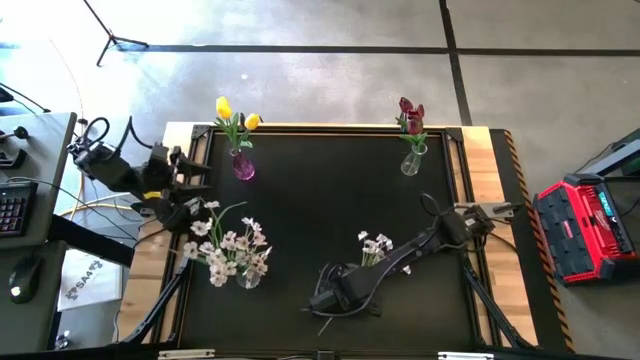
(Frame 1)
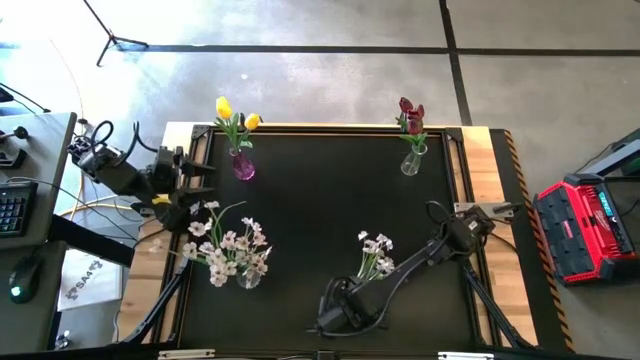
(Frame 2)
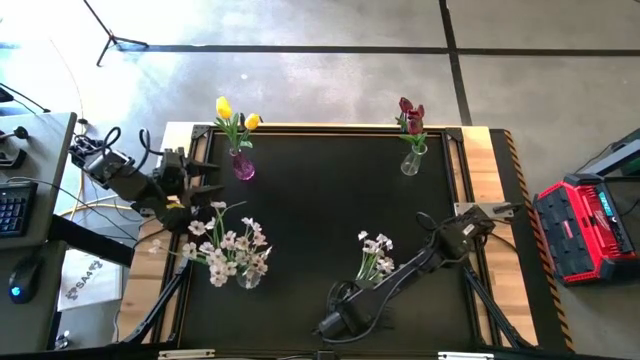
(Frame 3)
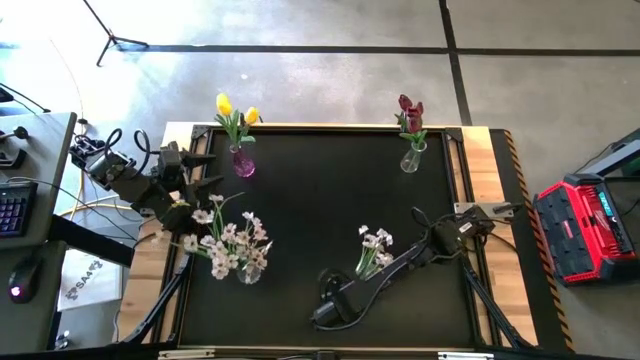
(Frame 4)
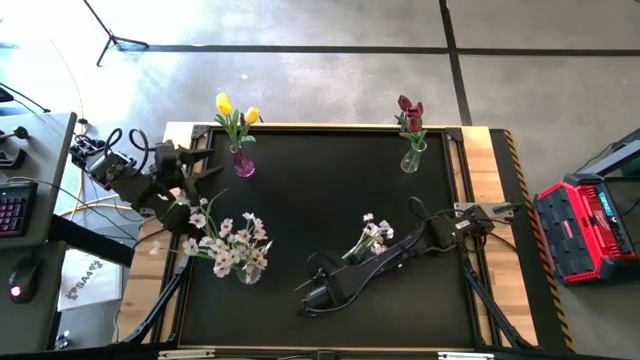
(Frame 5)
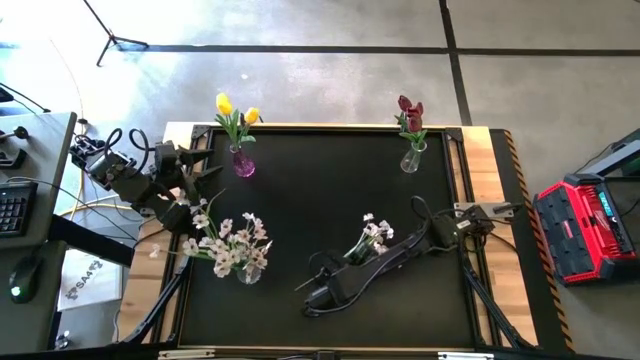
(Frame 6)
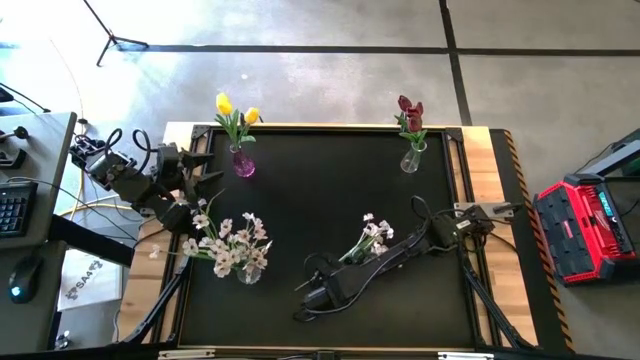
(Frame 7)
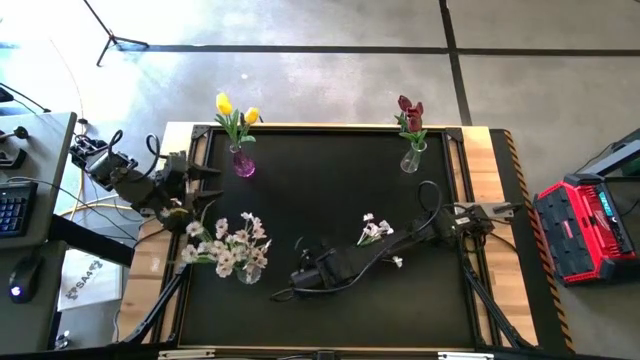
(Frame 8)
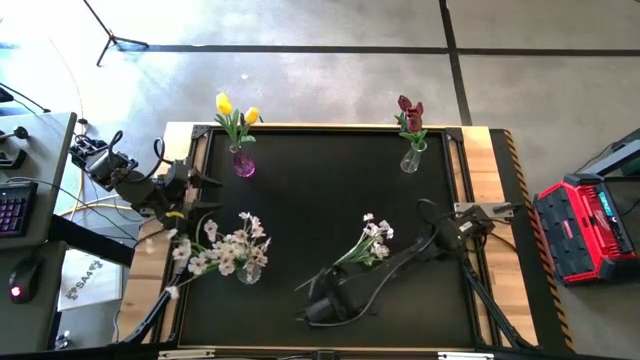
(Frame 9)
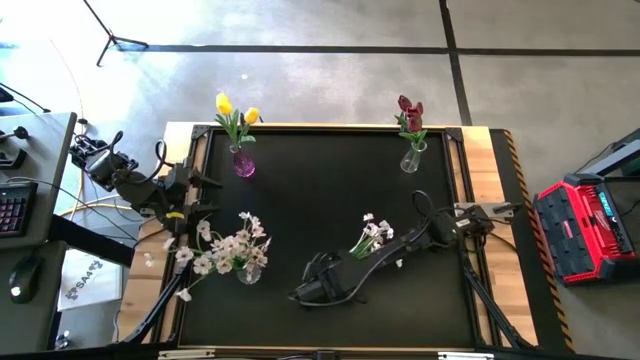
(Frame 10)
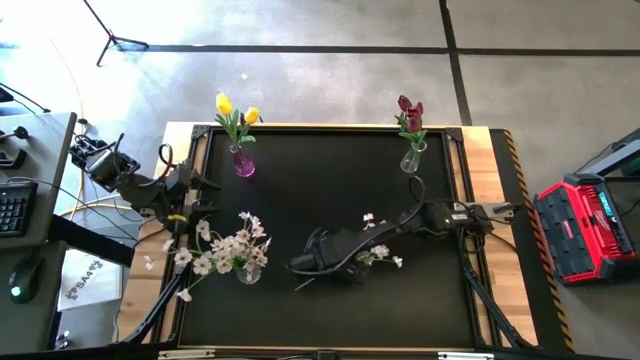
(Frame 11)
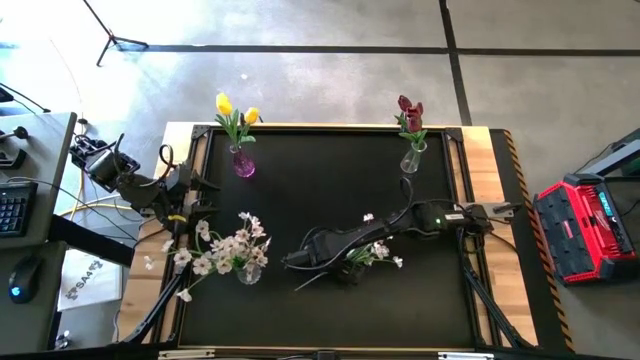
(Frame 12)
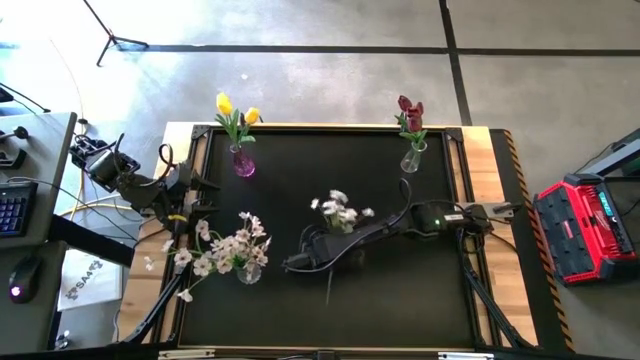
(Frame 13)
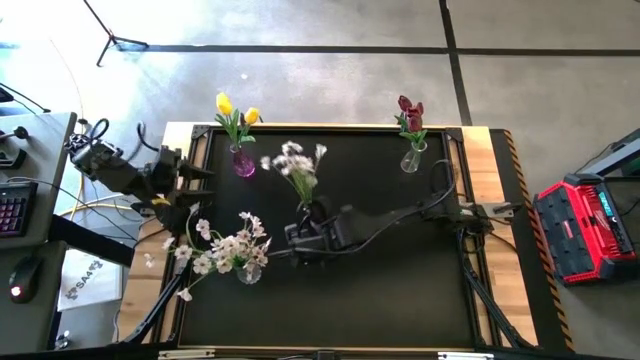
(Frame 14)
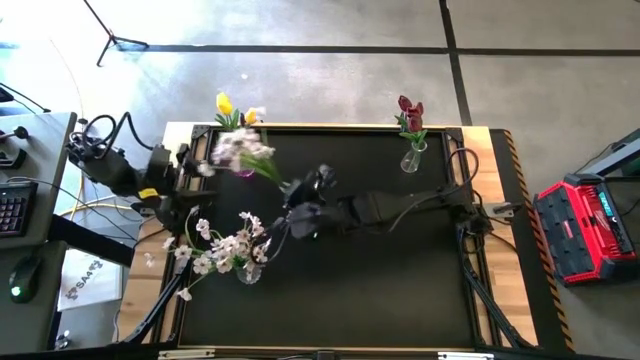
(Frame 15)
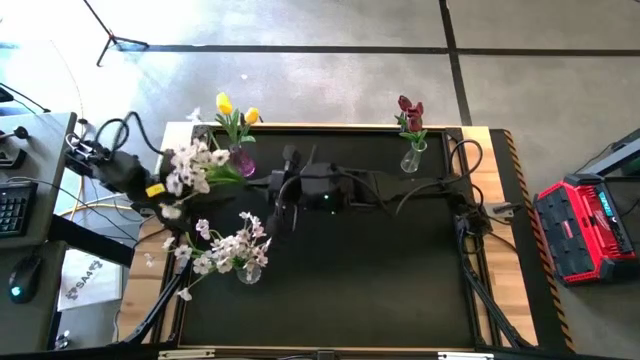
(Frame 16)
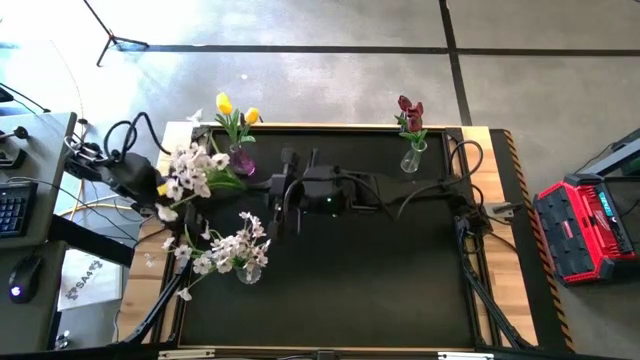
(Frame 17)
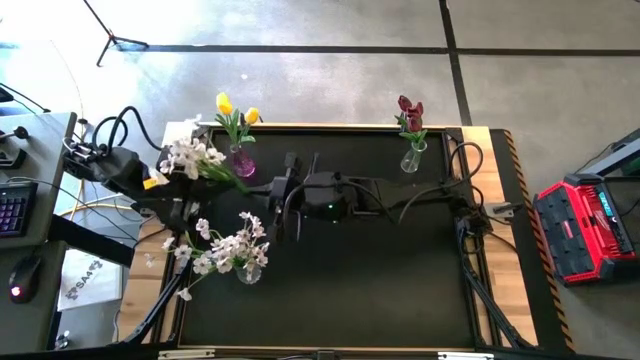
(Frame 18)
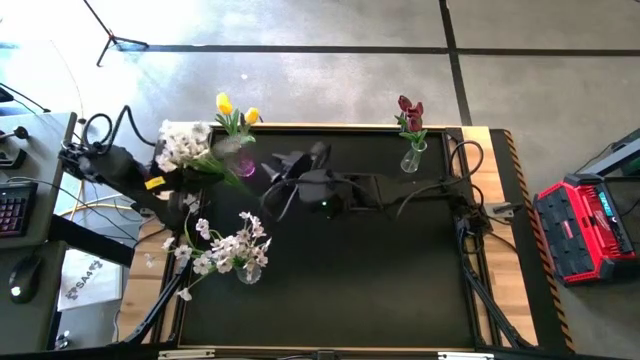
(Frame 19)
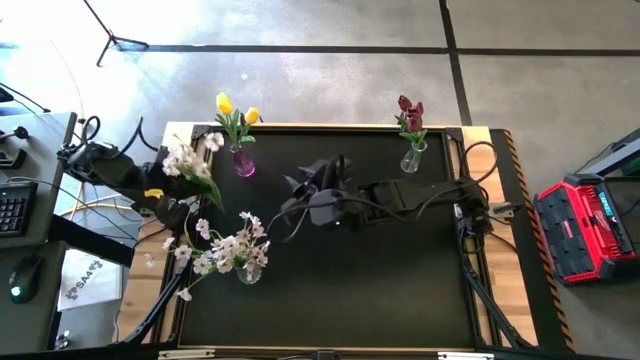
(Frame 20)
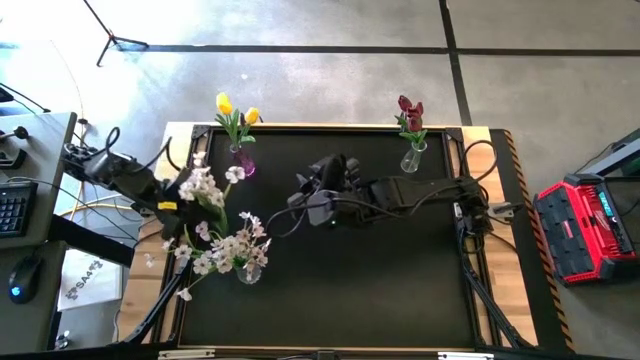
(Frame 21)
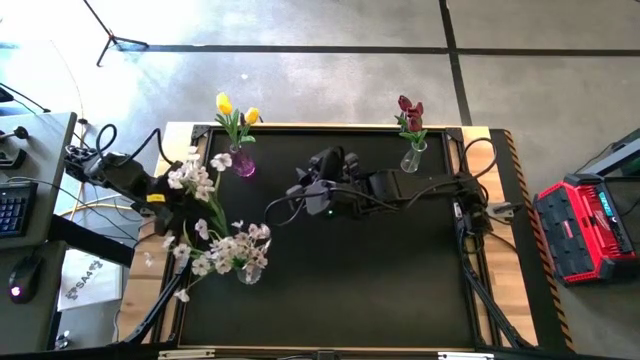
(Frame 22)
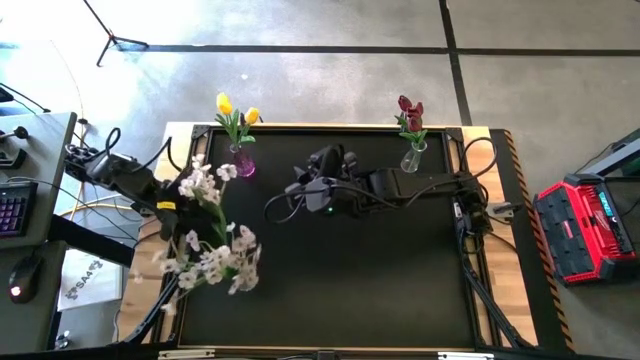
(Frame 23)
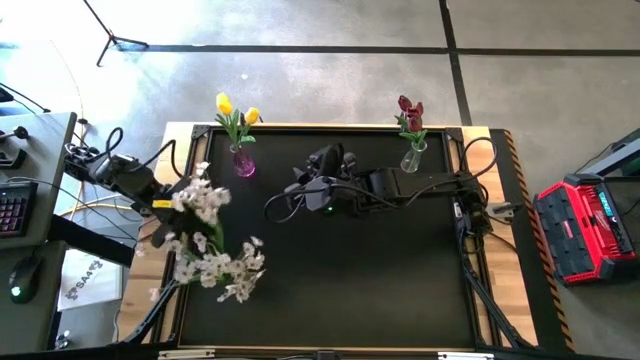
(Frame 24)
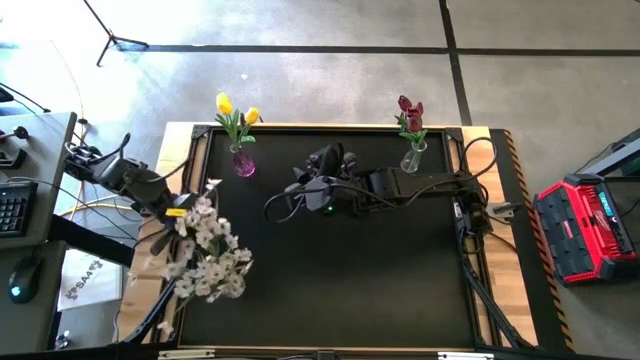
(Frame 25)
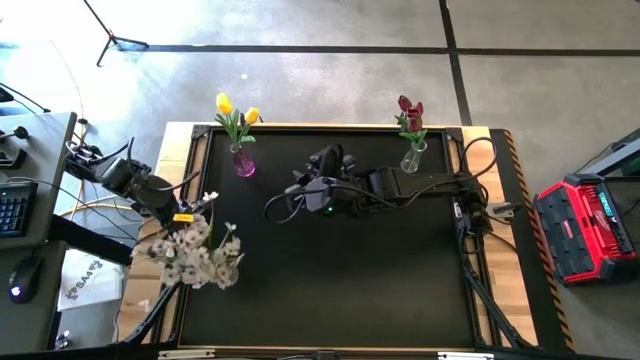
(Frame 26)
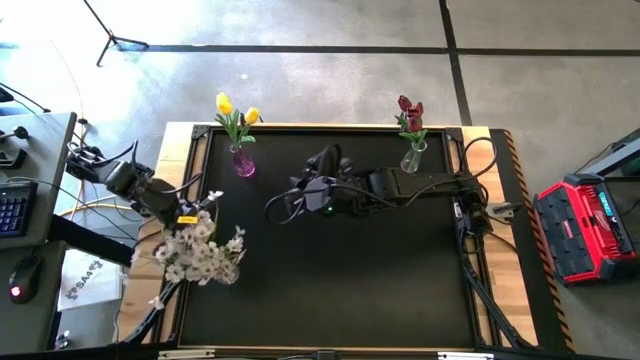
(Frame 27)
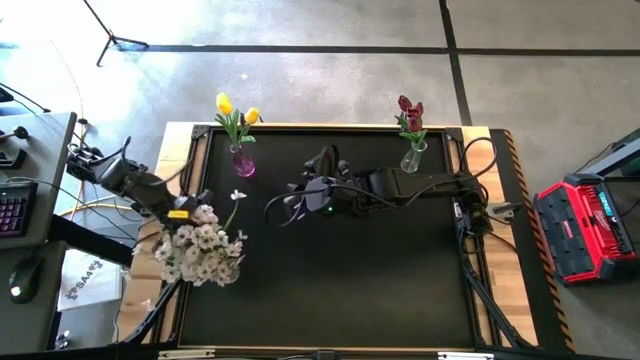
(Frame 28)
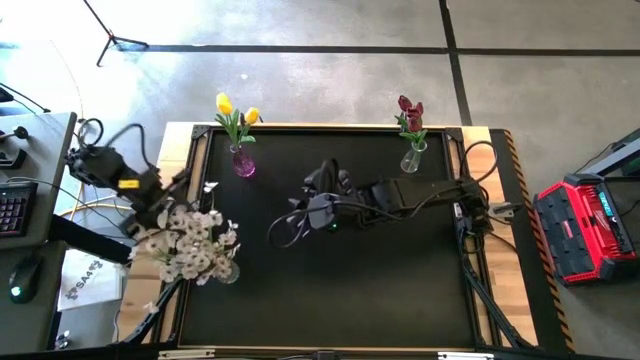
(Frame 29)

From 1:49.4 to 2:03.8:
Task: Sort flowers into vase by color
Put the white flower into the bottom transparent vase

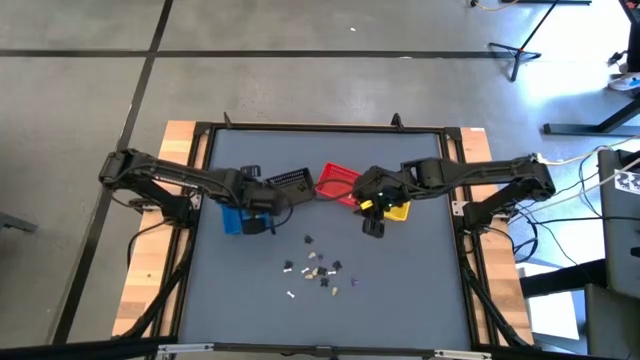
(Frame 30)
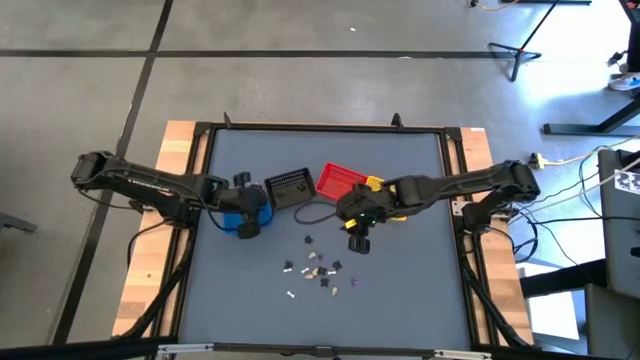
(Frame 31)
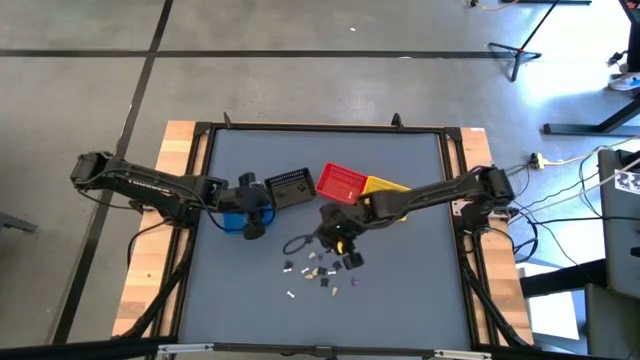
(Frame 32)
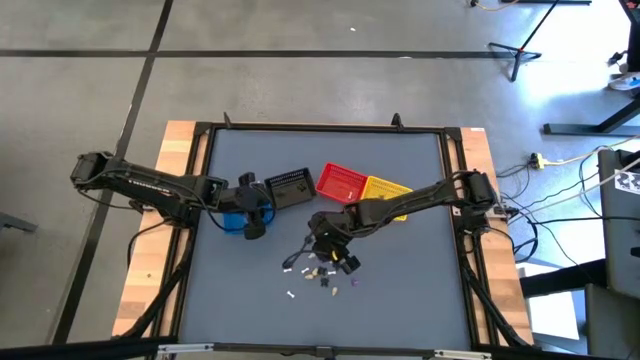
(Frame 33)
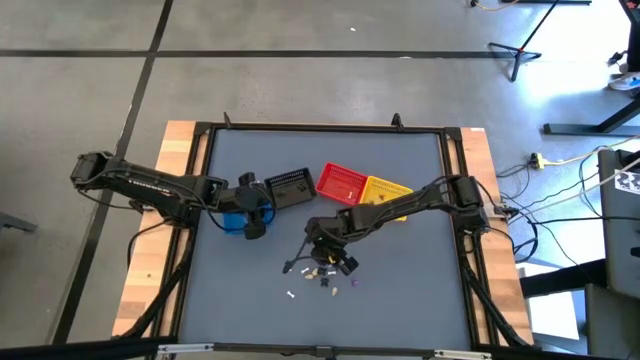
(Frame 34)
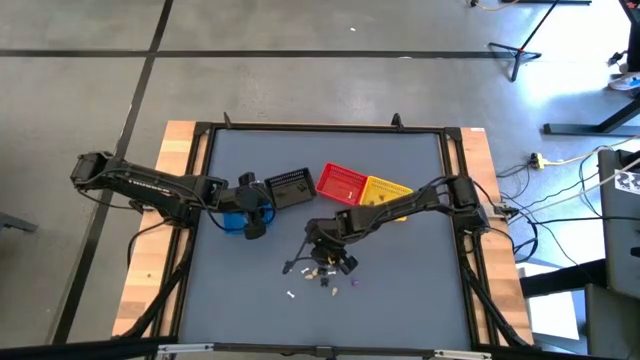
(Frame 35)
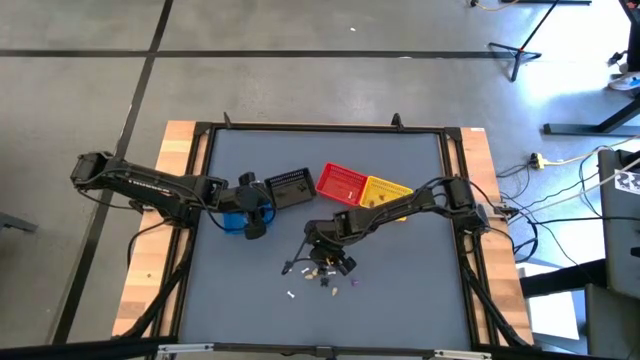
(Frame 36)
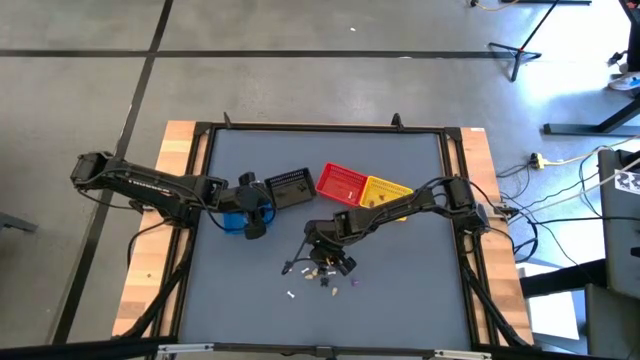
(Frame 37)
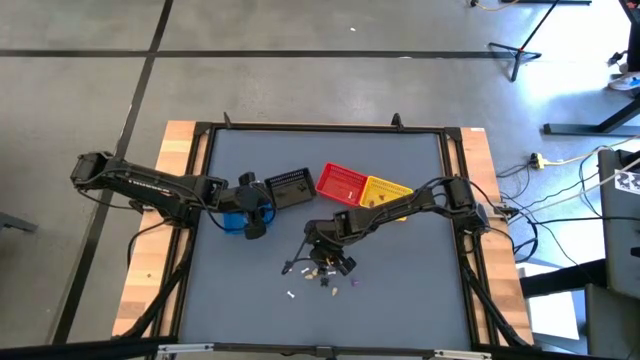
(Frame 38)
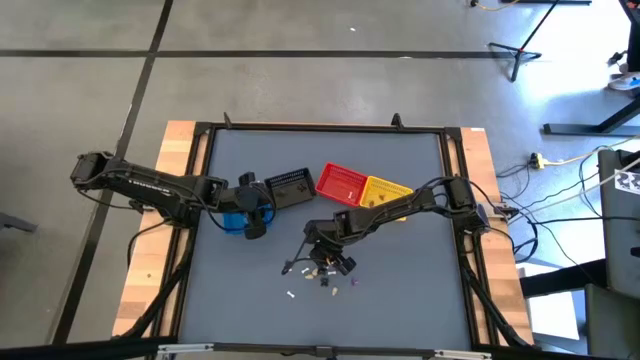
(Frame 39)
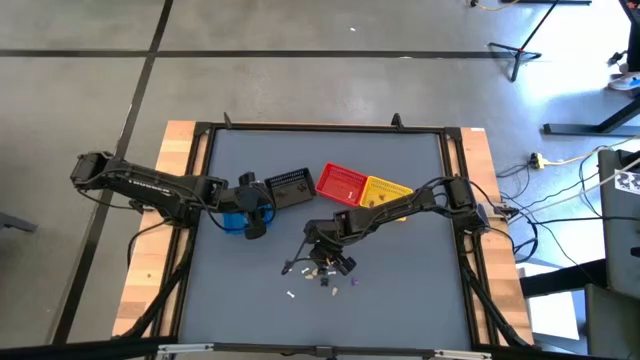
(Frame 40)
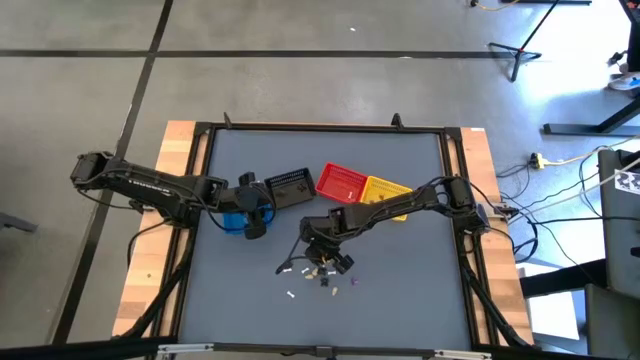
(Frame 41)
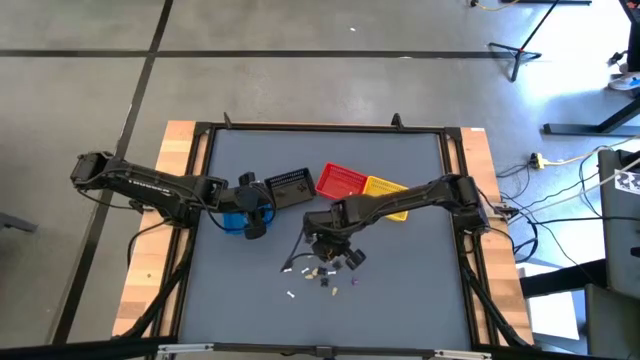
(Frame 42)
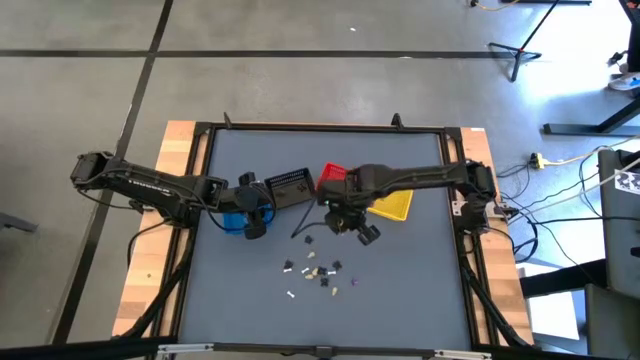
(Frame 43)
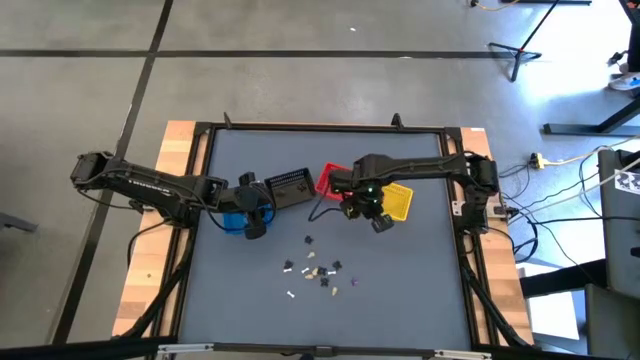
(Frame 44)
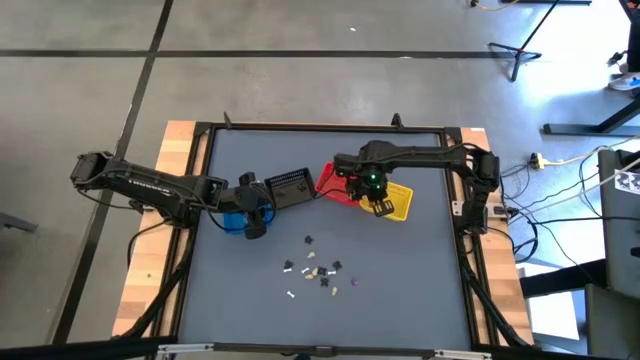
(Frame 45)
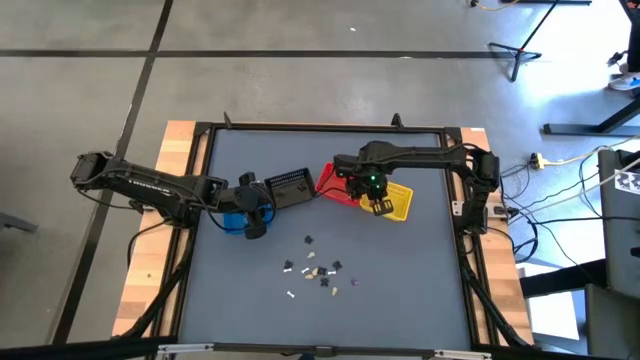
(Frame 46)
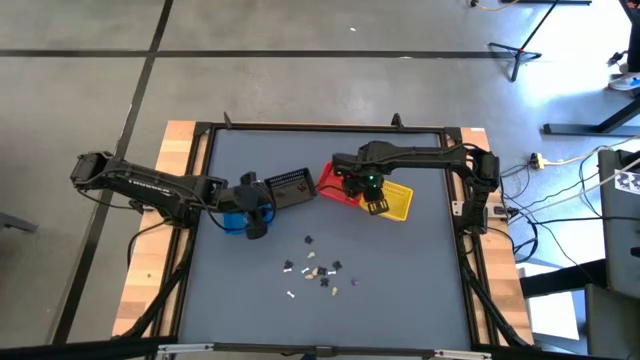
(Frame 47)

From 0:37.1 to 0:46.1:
Task: Sort Halloween decoration
Put the purple witch hat toy into the yellow bin
